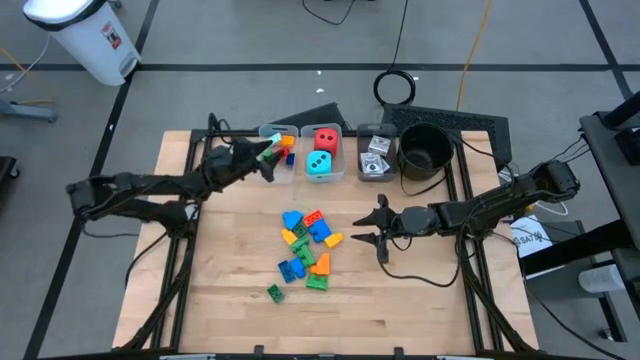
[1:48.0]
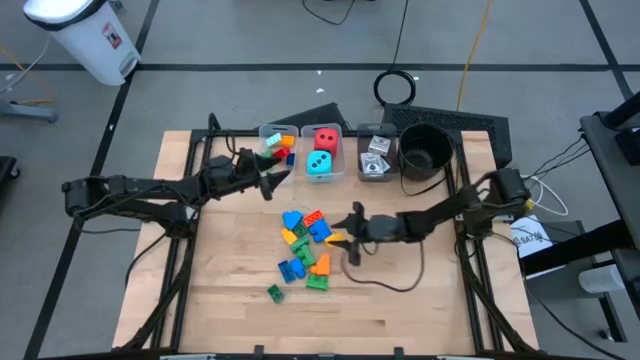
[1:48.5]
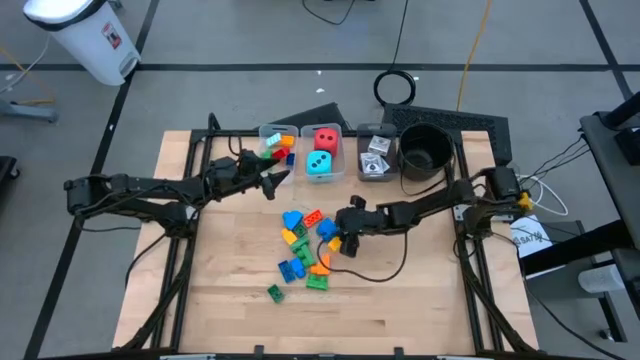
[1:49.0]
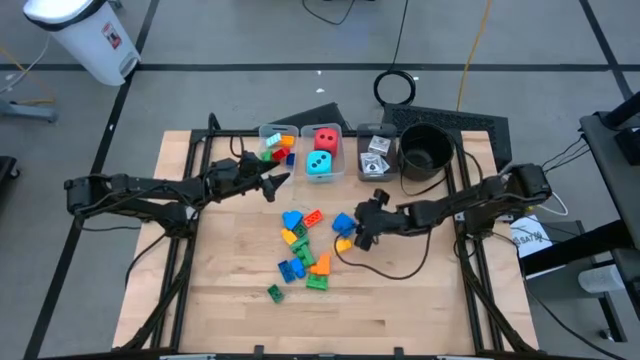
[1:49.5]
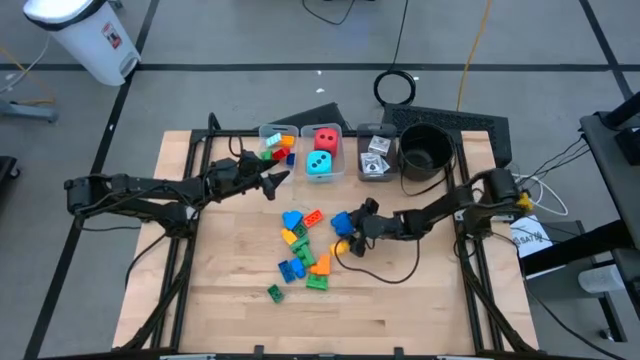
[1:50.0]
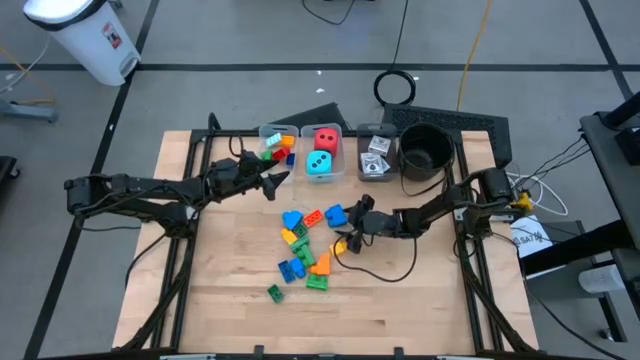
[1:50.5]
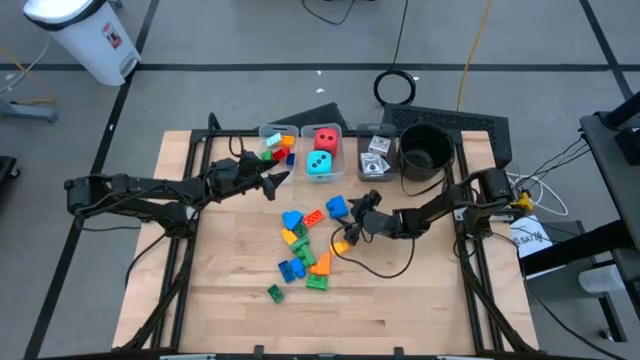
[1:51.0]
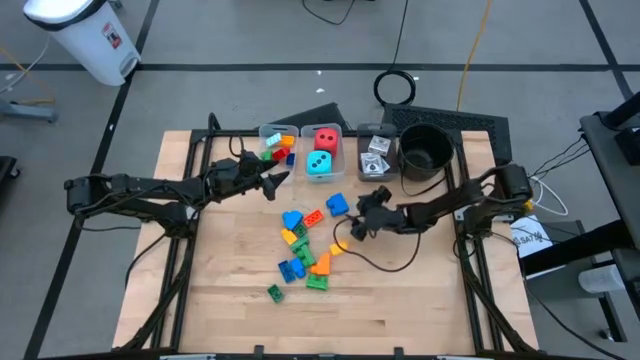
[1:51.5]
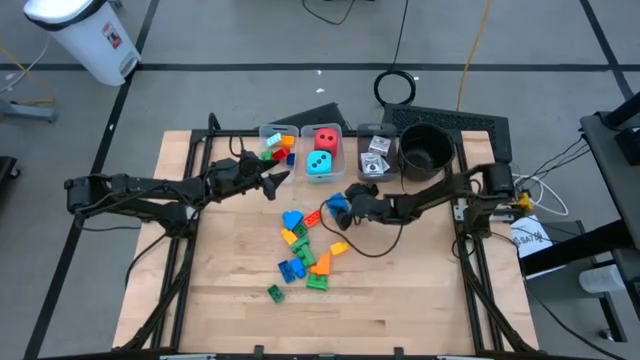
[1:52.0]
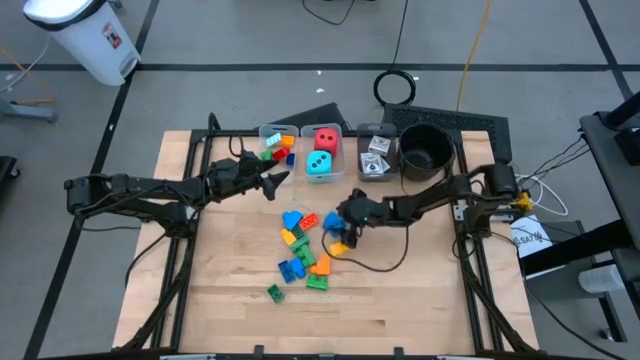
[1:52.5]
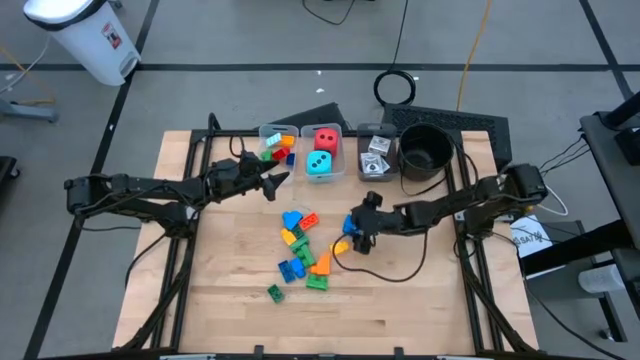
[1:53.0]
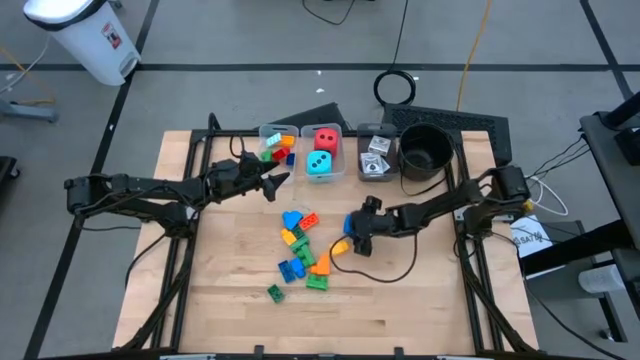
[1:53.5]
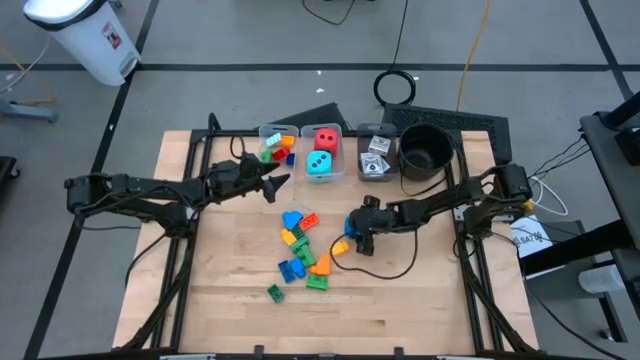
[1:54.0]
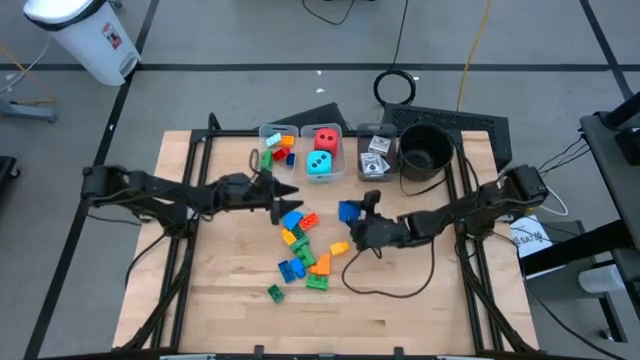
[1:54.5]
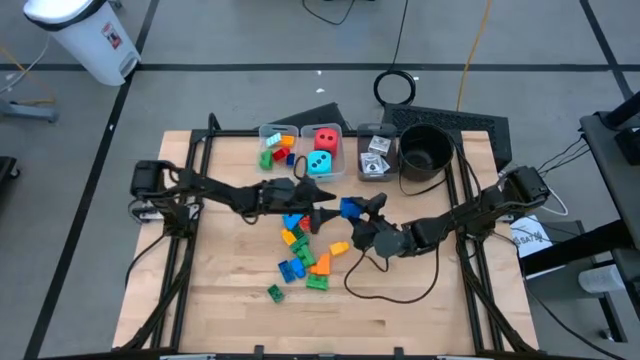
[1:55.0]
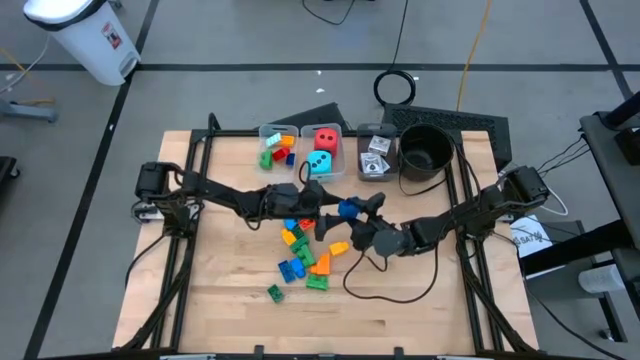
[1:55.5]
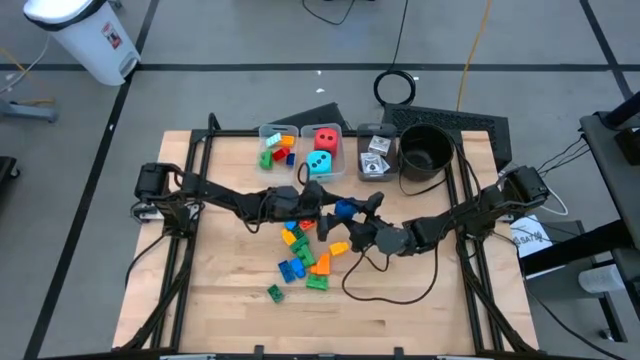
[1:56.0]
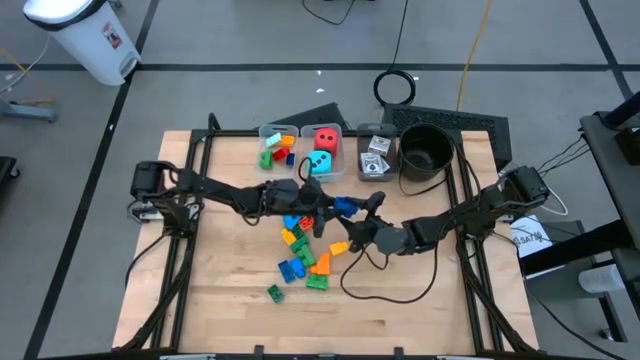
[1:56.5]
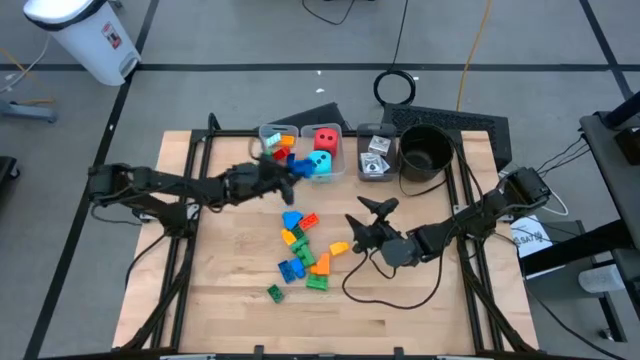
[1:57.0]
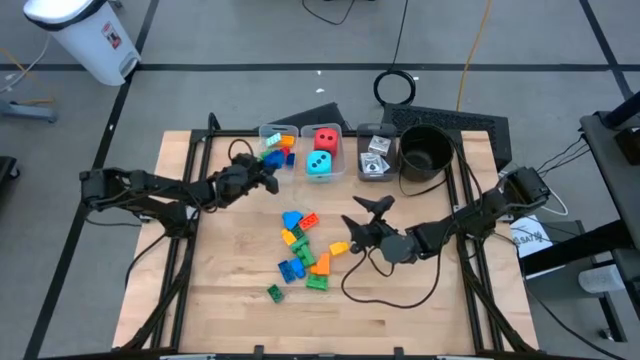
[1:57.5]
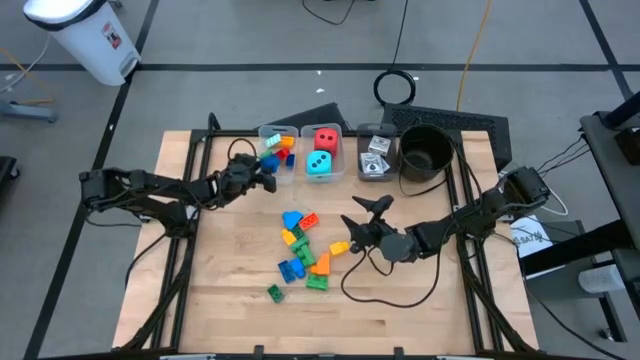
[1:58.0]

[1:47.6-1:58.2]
Task: Pick & Place Toys
Put the blue game piece into the left transparent bin

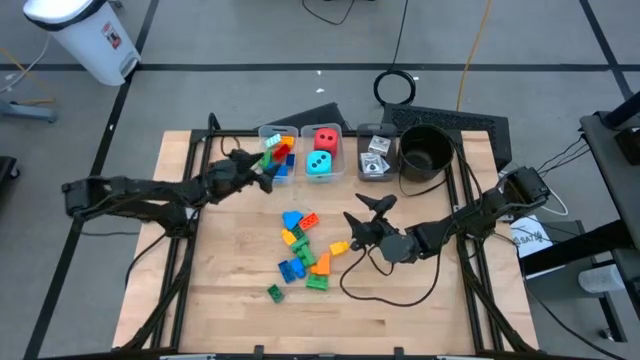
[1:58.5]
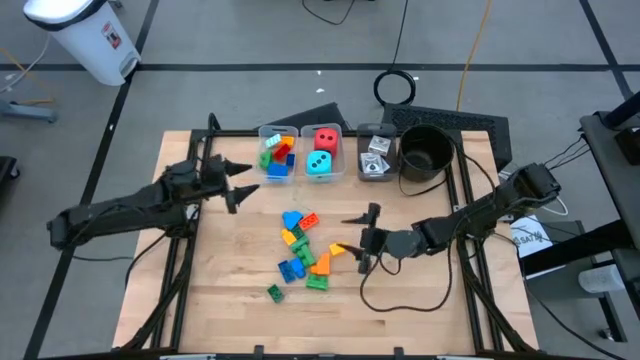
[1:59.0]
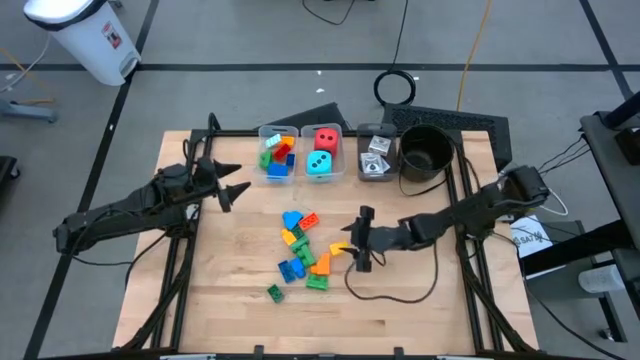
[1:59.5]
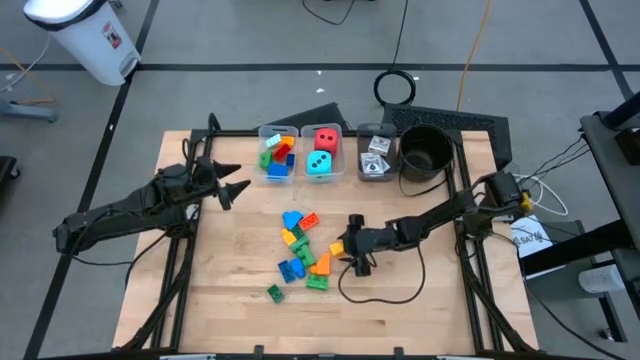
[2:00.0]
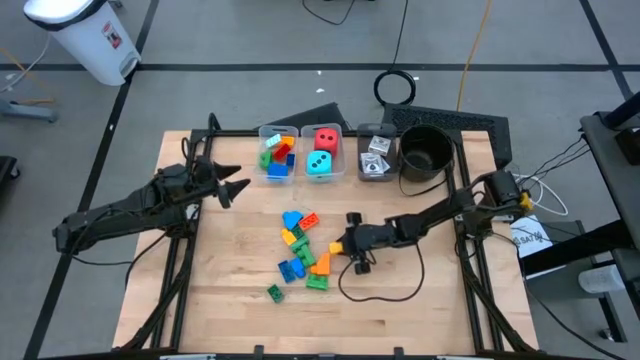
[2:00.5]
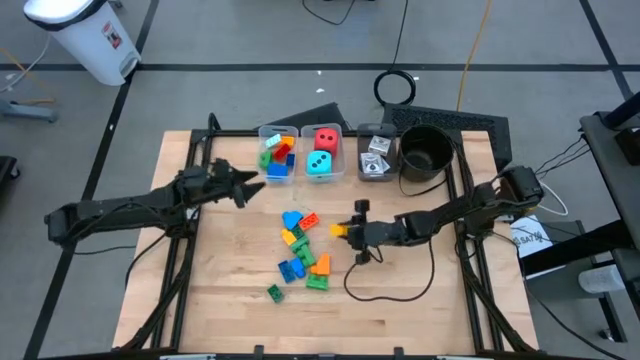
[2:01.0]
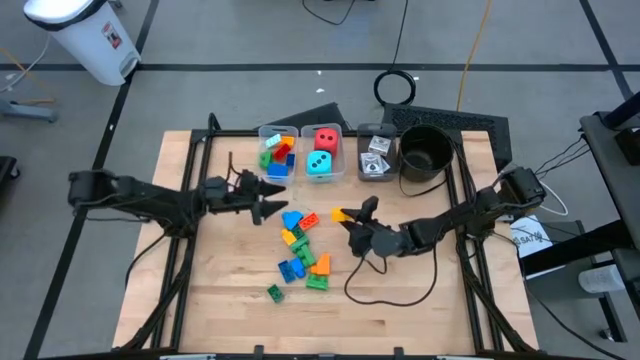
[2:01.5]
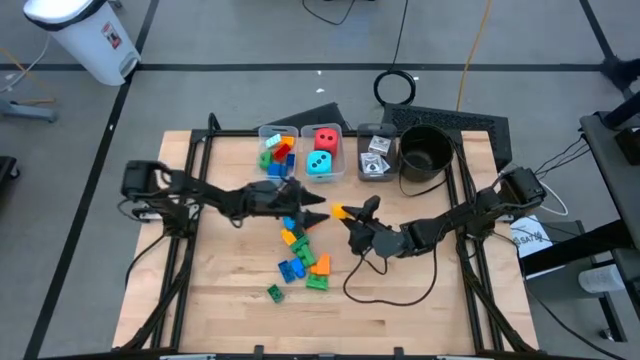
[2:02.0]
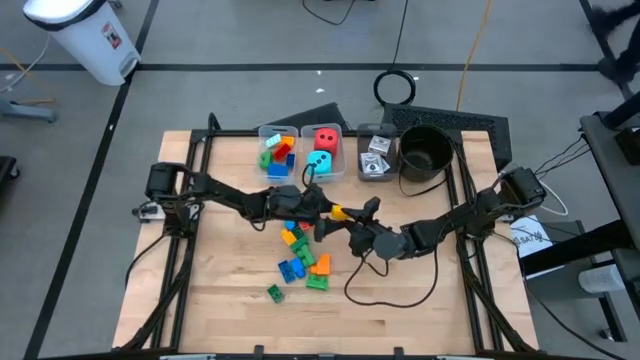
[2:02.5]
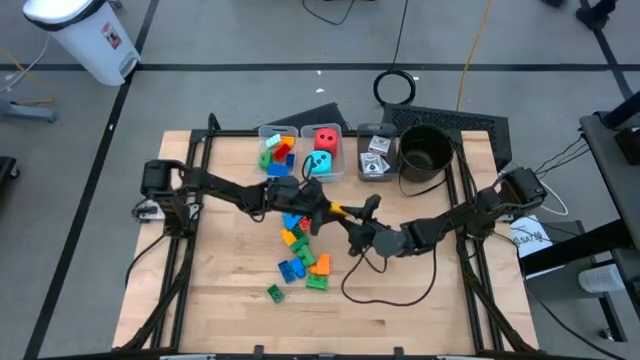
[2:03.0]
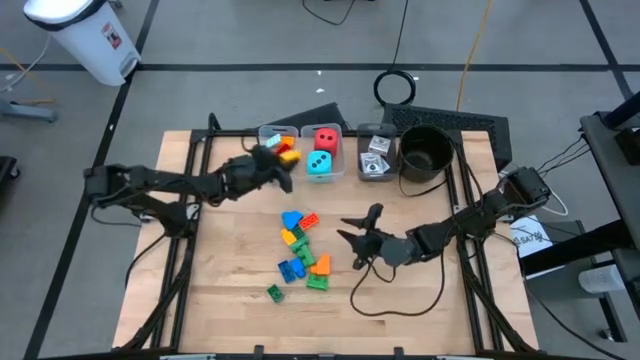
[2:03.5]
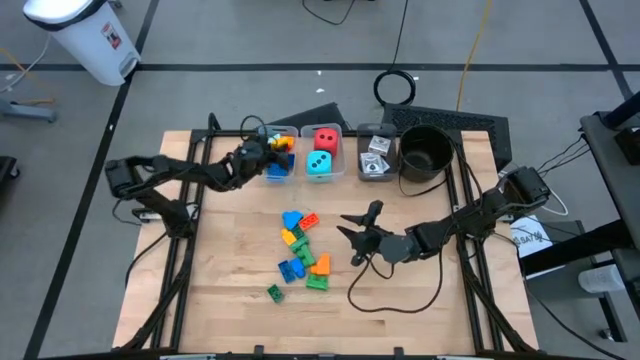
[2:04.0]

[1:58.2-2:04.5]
Put the yellow game piece into the left transparent bin
